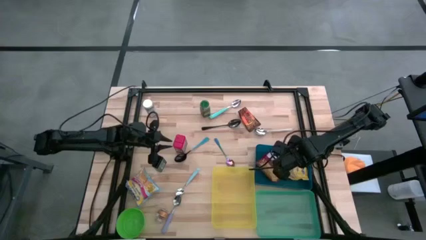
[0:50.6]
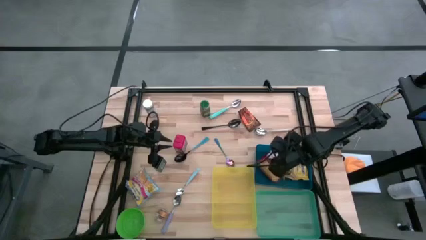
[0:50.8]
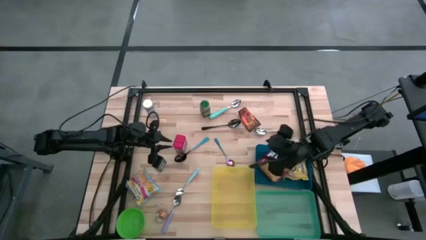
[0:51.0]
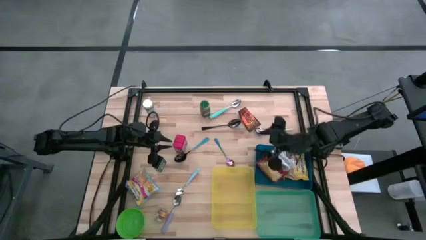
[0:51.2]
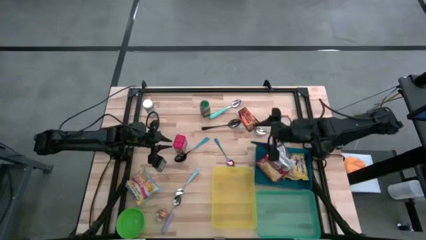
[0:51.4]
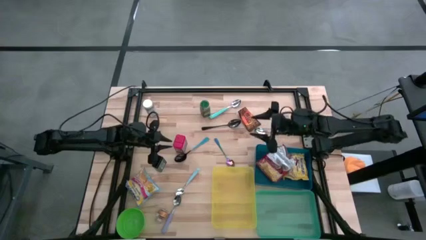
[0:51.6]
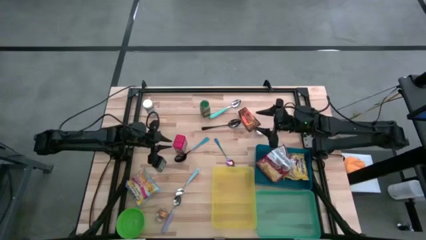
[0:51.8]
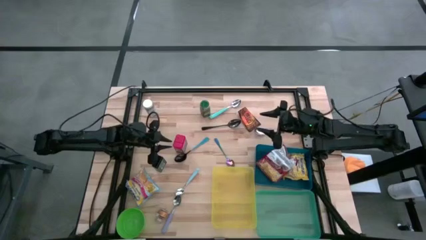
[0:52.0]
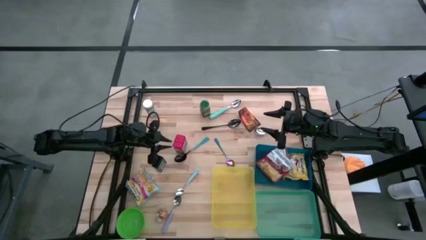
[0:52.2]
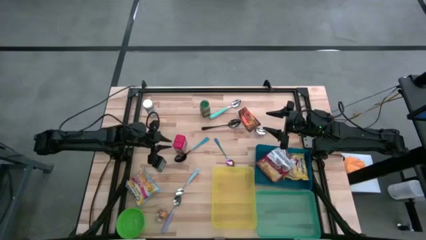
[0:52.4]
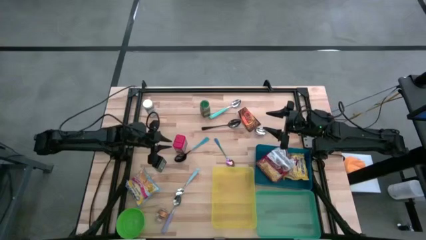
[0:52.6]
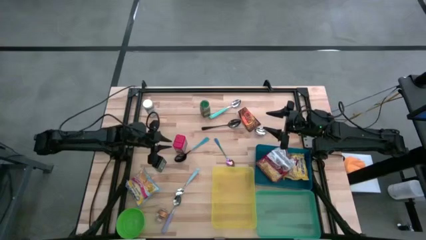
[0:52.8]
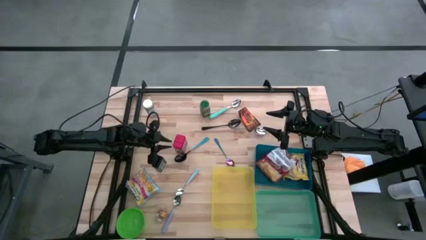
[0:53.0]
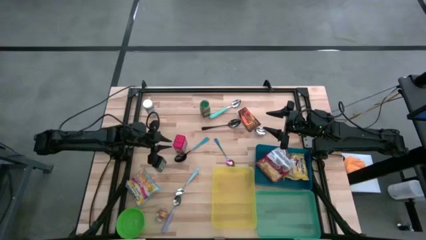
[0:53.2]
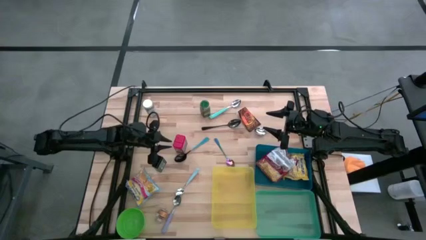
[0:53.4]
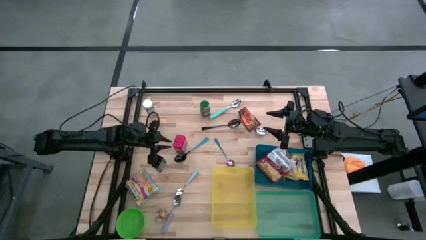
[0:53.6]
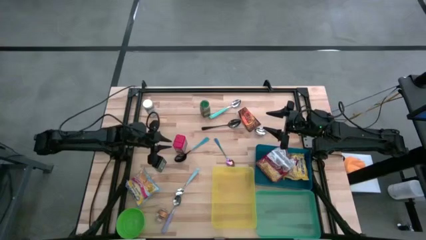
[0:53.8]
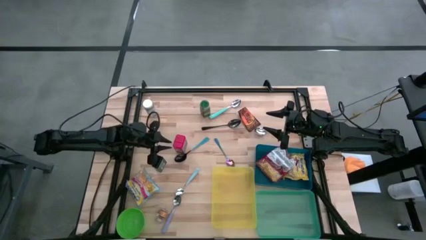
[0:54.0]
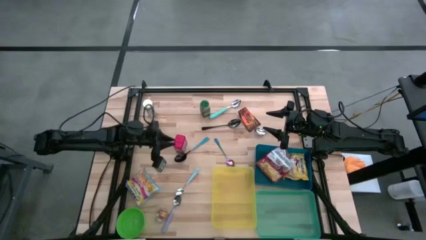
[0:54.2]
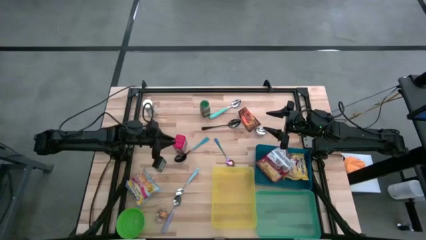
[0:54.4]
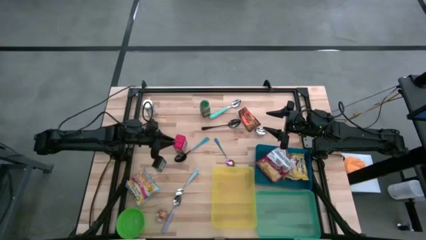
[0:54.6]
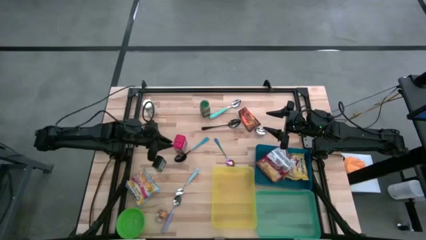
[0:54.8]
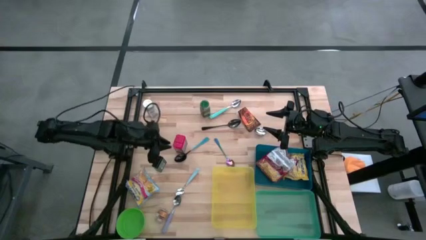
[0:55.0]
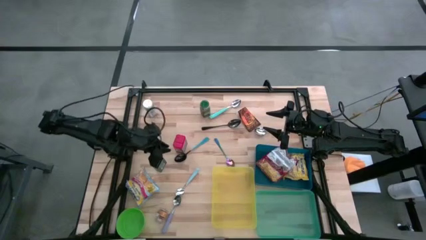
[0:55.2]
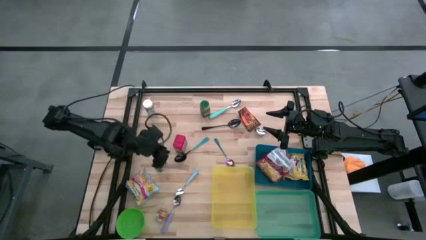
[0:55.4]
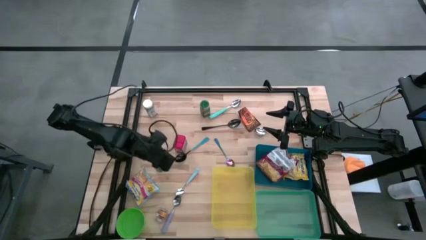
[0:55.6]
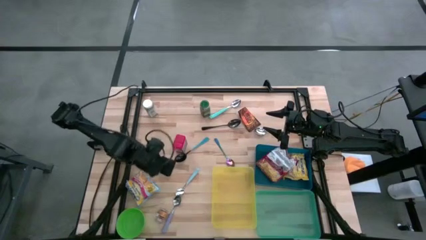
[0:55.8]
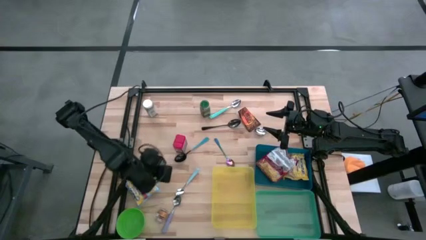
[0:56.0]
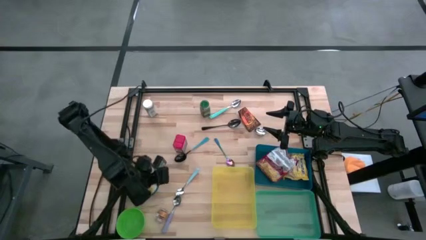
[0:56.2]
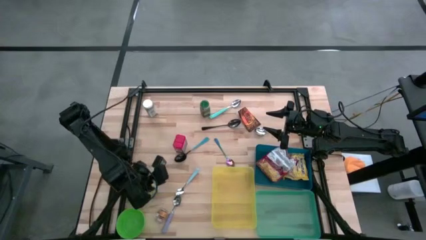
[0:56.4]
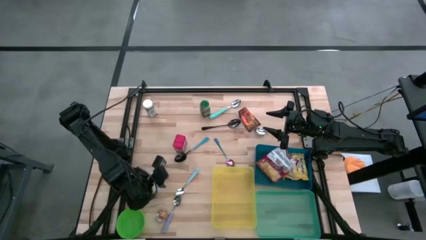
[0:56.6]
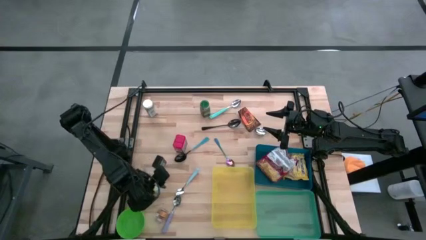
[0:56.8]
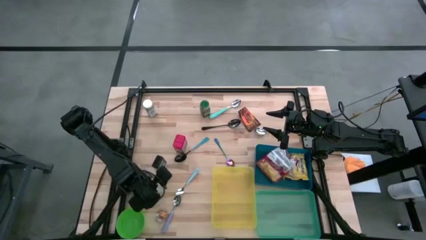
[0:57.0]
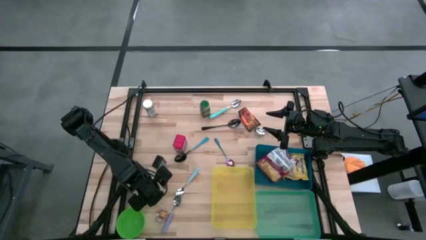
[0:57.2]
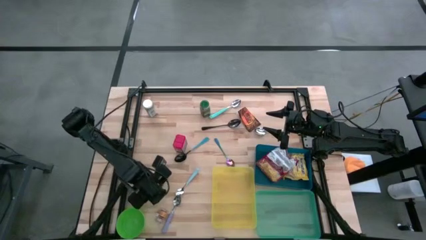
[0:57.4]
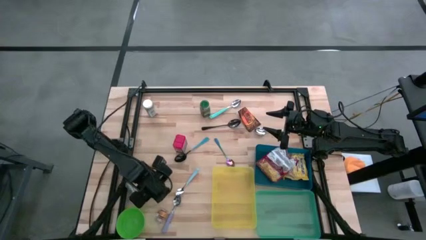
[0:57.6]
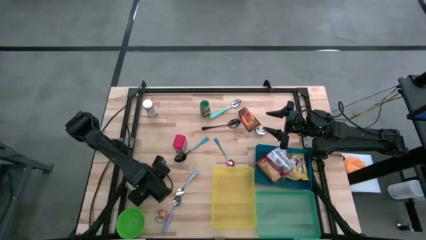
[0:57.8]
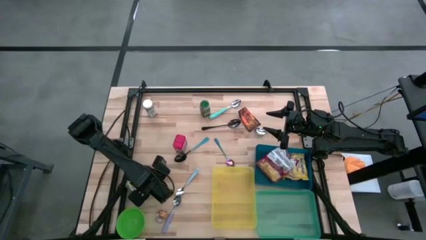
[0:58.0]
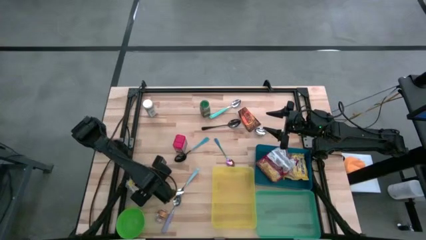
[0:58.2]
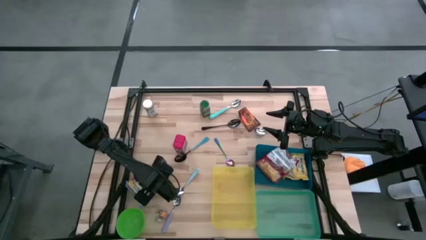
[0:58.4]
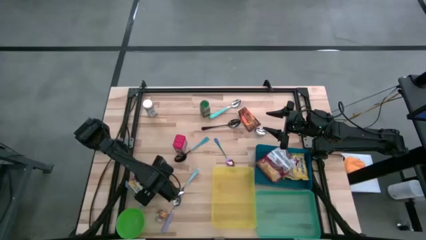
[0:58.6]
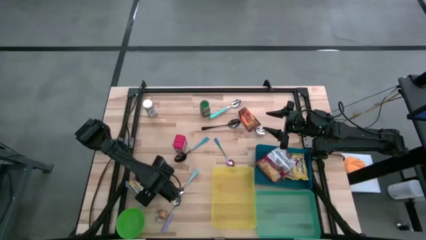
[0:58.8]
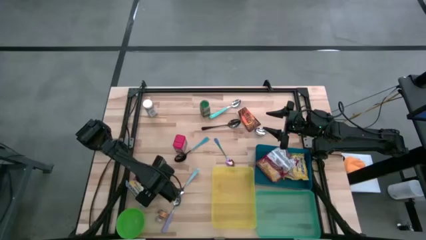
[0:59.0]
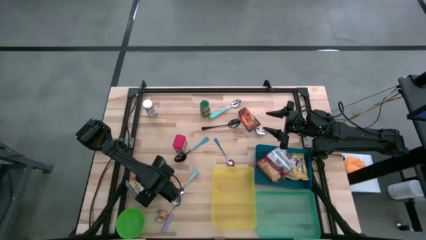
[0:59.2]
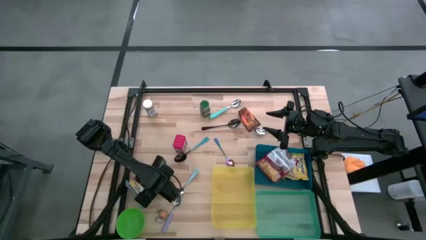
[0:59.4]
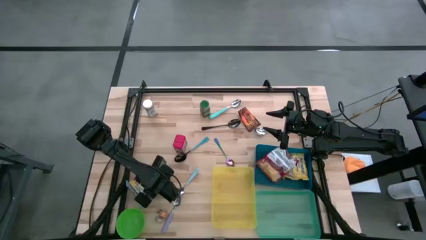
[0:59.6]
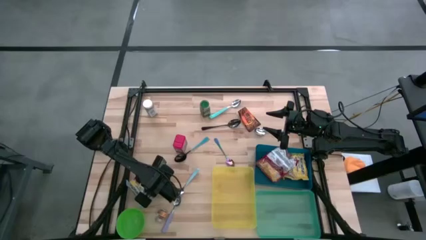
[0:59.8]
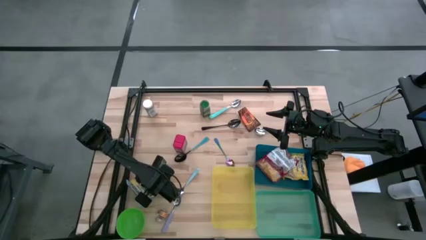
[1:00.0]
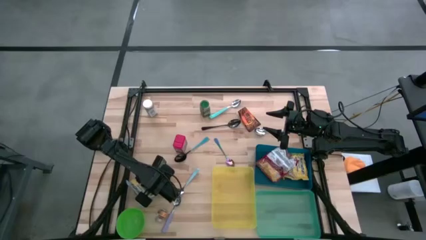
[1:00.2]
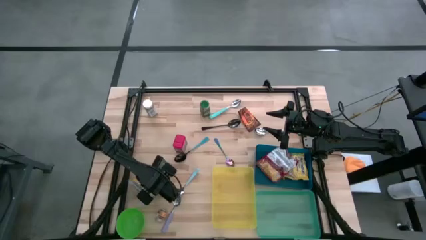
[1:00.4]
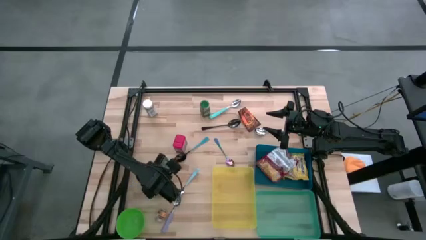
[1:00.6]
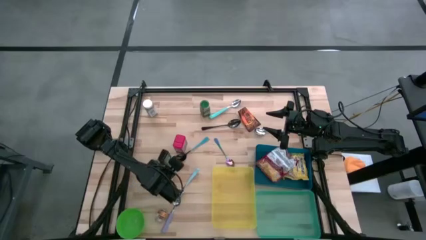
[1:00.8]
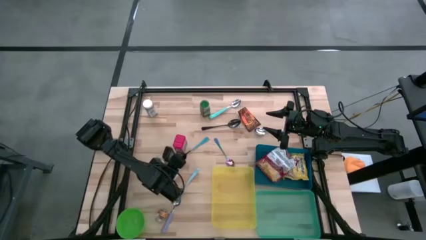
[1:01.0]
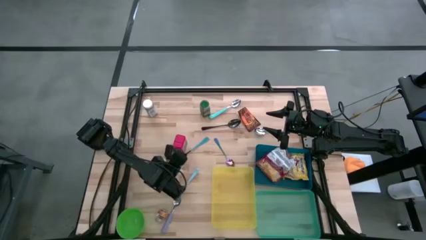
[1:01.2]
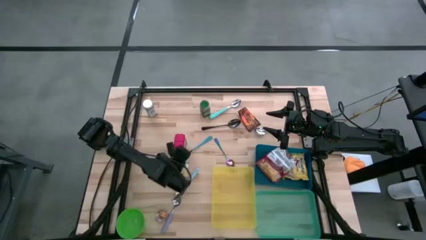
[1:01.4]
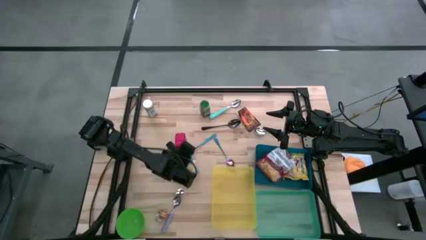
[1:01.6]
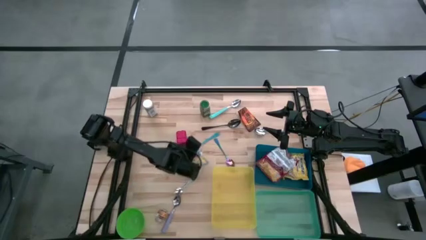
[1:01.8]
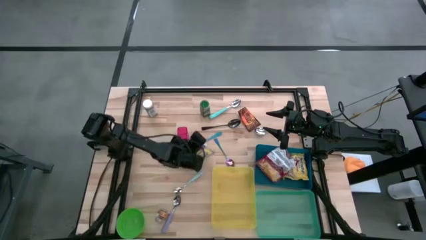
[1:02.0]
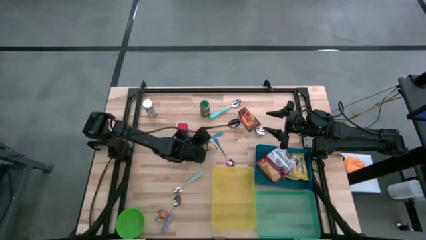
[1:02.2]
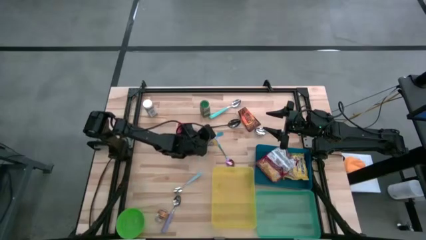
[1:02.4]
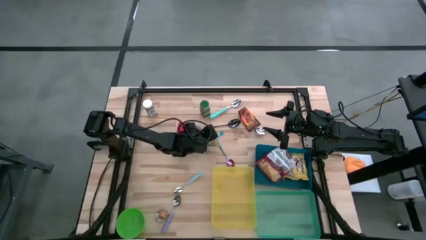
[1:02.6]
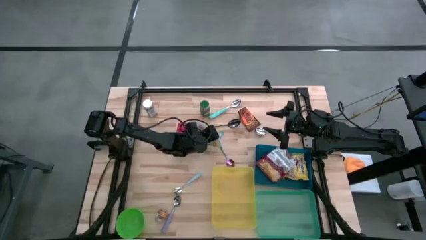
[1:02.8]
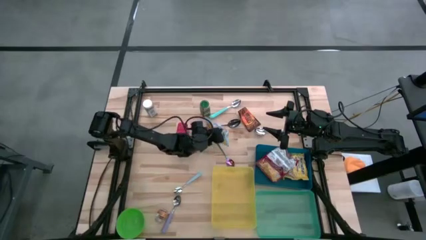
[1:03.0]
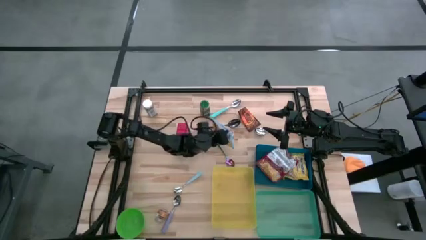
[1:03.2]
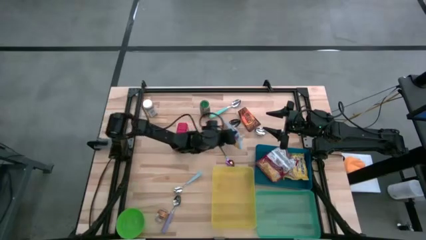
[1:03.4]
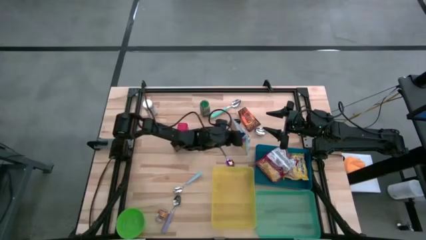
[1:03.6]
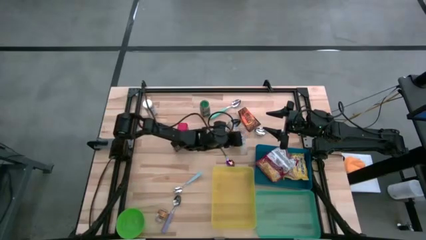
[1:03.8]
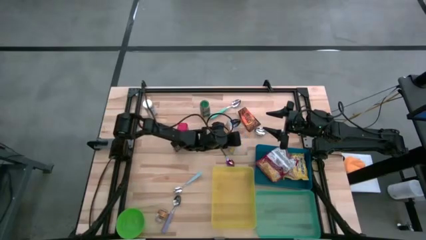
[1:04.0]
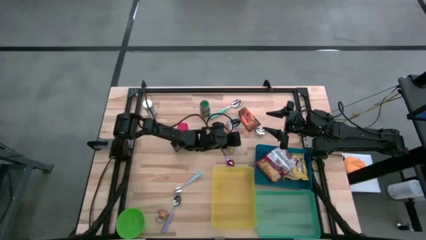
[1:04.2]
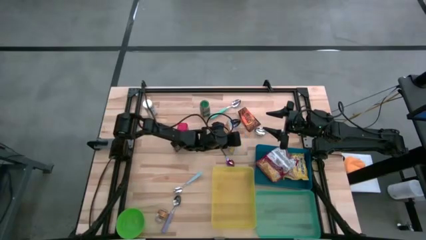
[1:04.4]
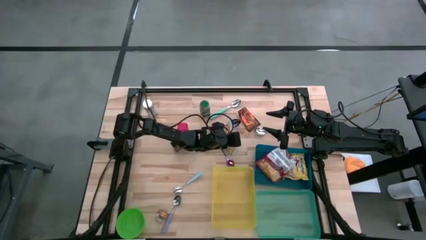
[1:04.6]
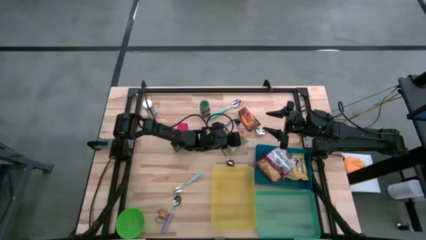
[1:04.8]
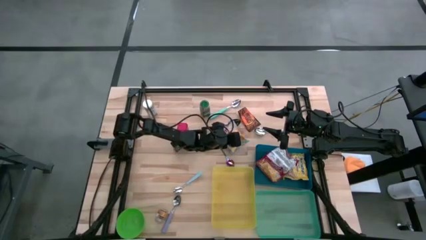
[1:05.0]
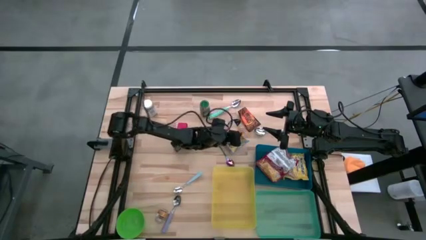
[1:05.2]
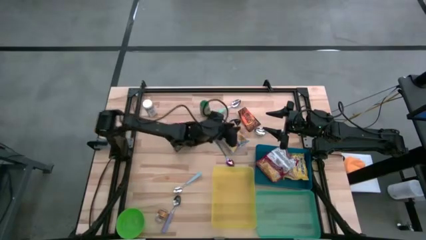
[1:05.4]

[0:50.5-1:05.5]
Put the blue noodle pack into the blue bin
